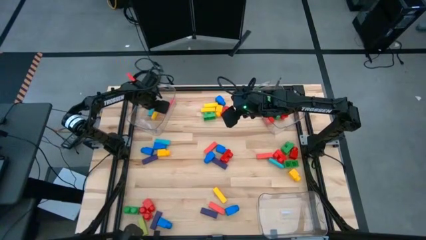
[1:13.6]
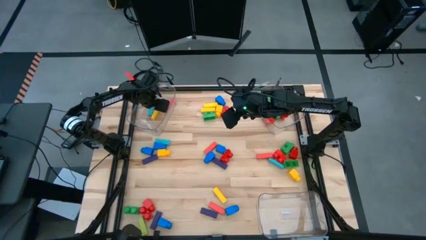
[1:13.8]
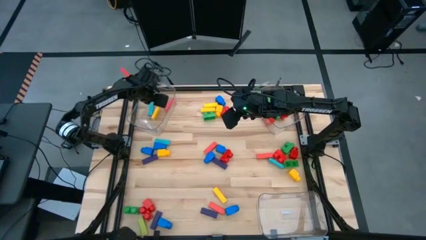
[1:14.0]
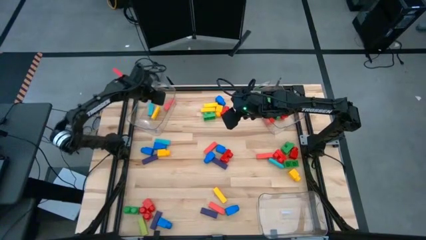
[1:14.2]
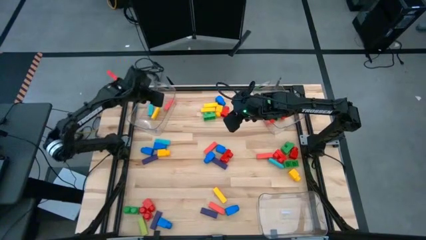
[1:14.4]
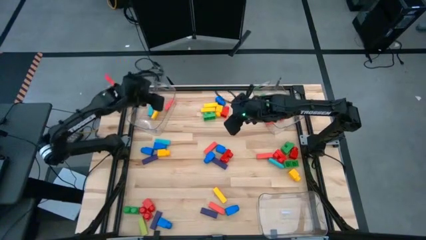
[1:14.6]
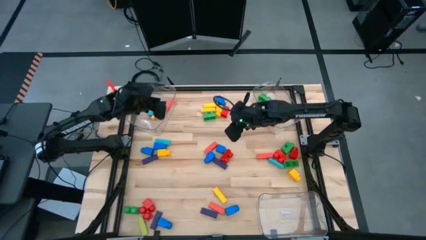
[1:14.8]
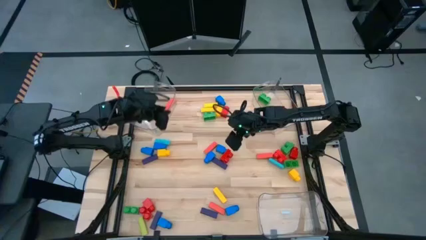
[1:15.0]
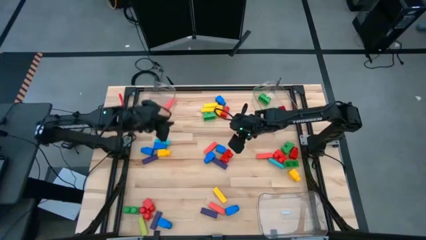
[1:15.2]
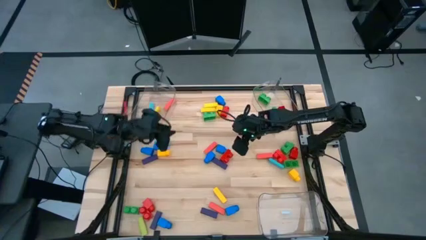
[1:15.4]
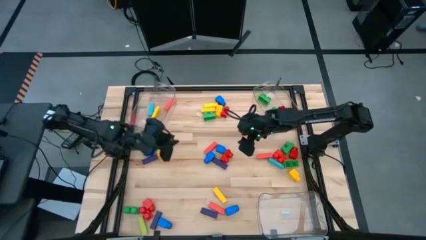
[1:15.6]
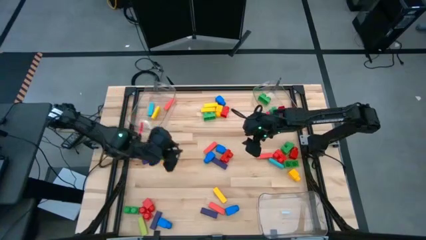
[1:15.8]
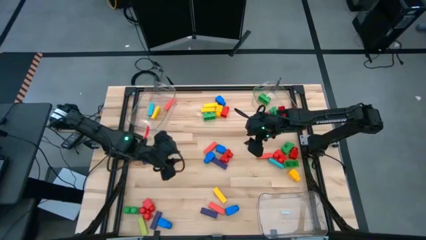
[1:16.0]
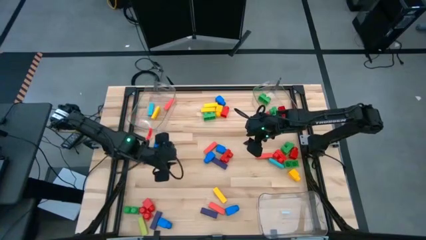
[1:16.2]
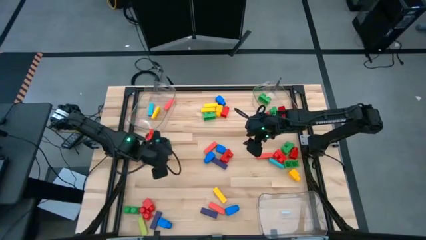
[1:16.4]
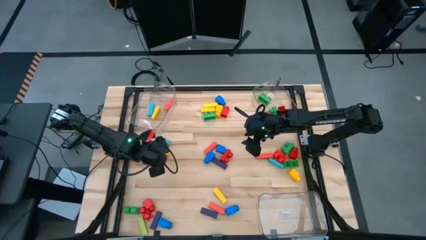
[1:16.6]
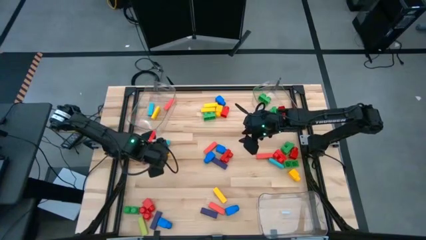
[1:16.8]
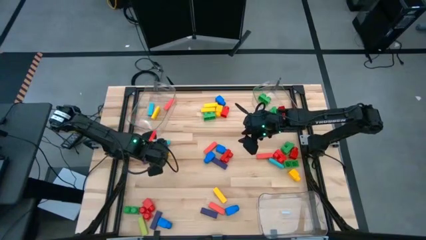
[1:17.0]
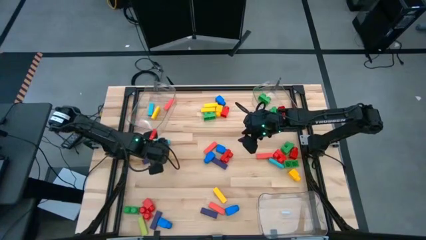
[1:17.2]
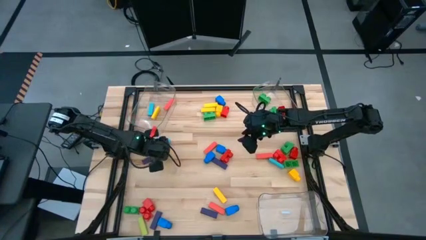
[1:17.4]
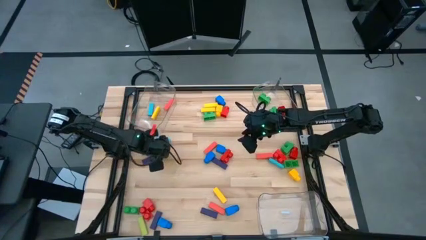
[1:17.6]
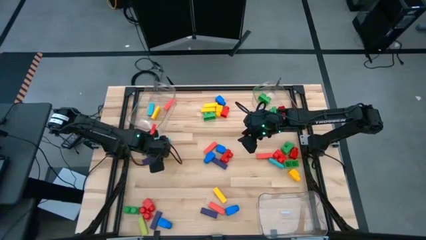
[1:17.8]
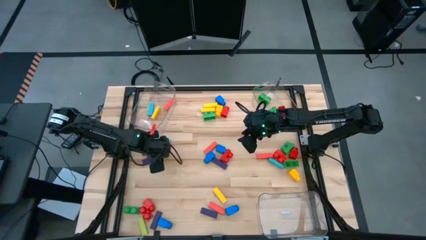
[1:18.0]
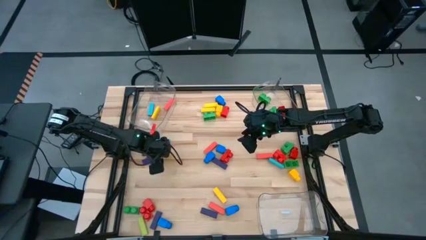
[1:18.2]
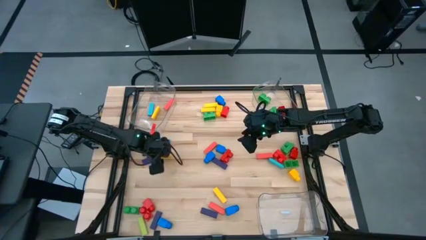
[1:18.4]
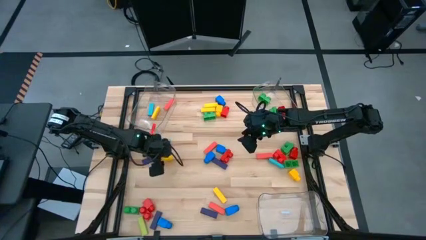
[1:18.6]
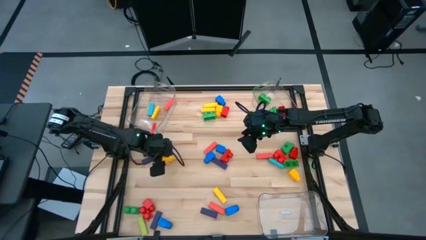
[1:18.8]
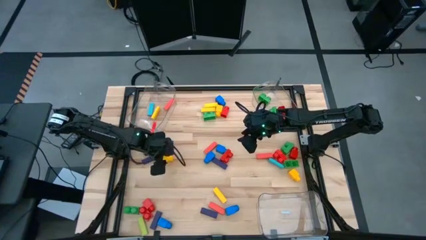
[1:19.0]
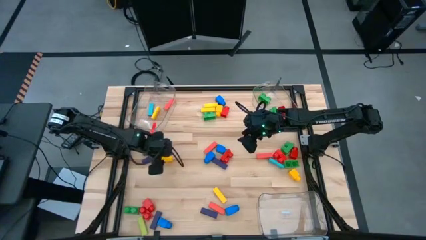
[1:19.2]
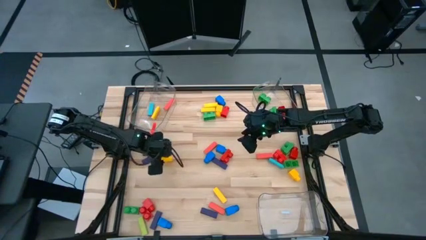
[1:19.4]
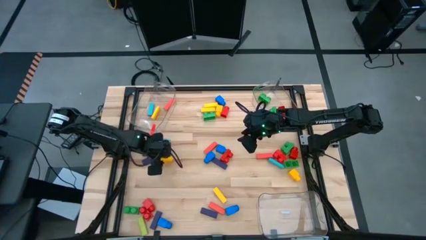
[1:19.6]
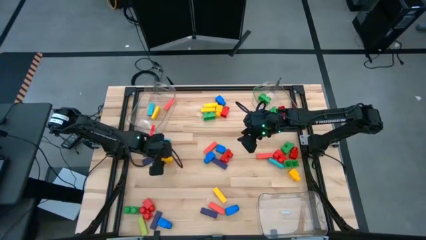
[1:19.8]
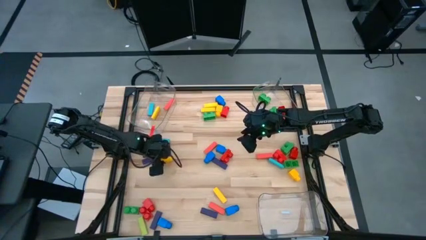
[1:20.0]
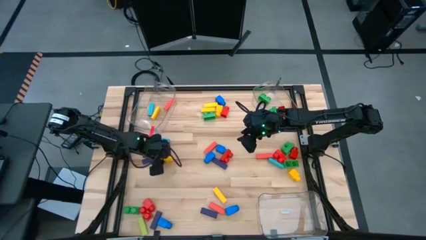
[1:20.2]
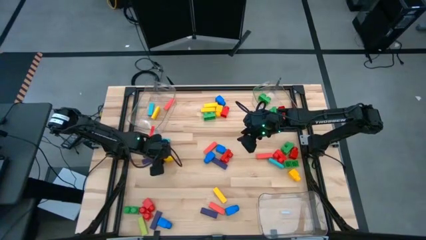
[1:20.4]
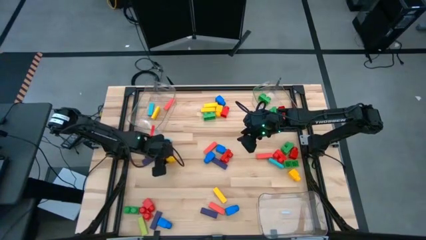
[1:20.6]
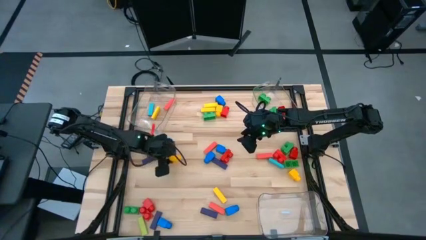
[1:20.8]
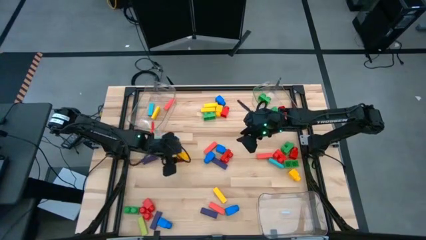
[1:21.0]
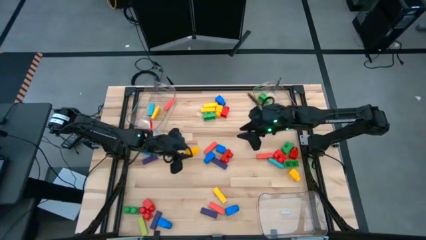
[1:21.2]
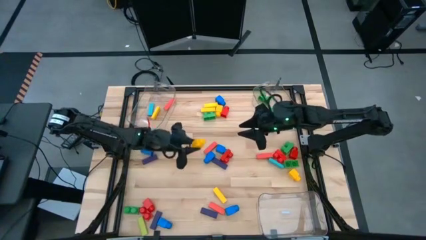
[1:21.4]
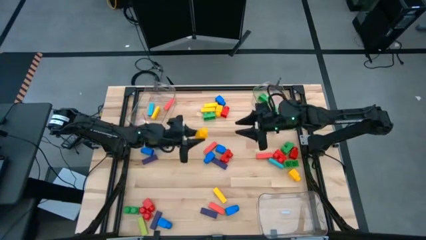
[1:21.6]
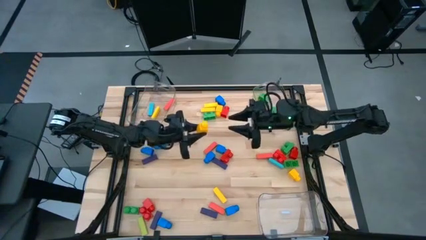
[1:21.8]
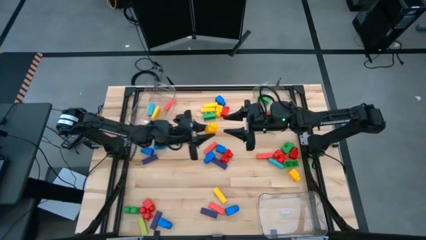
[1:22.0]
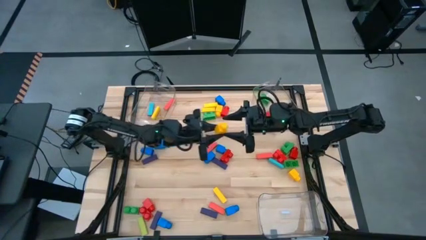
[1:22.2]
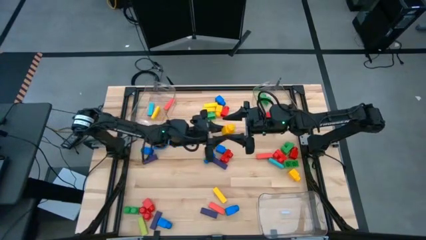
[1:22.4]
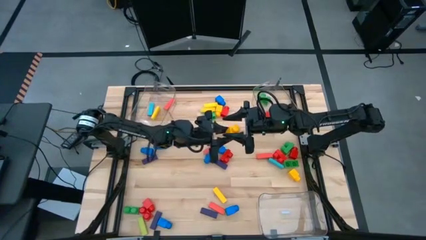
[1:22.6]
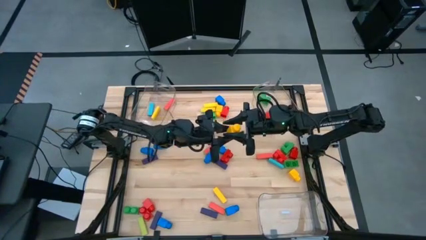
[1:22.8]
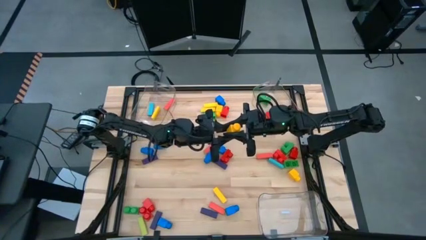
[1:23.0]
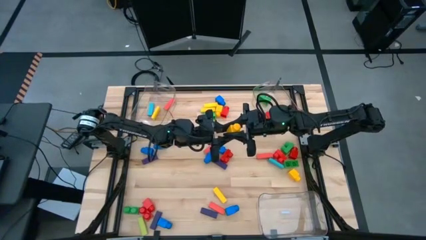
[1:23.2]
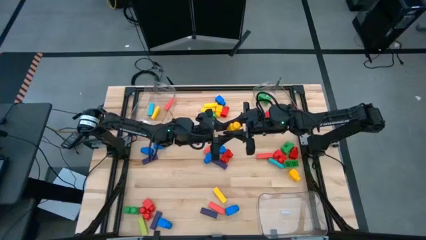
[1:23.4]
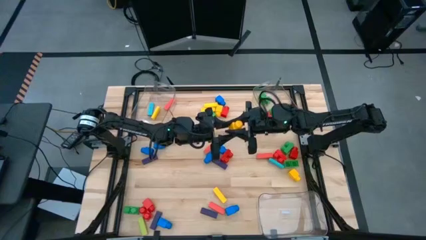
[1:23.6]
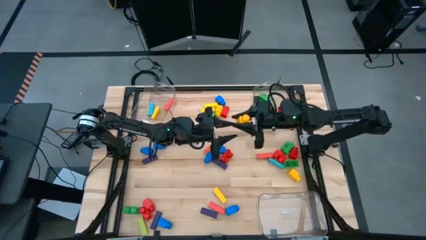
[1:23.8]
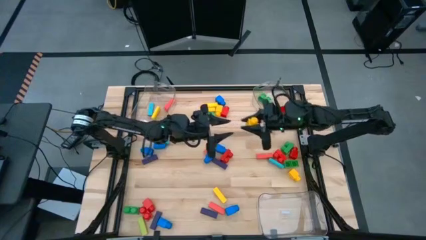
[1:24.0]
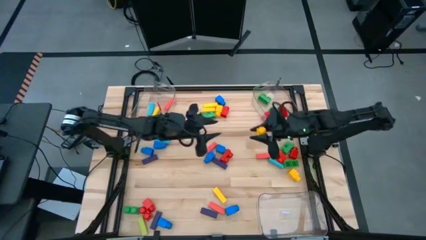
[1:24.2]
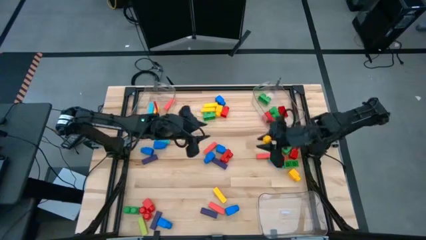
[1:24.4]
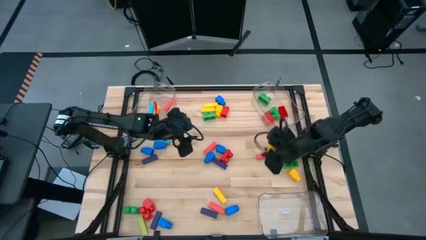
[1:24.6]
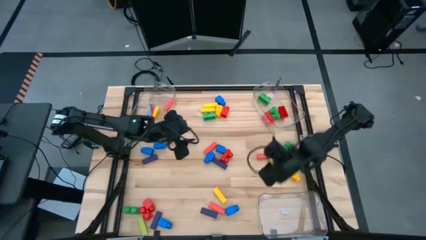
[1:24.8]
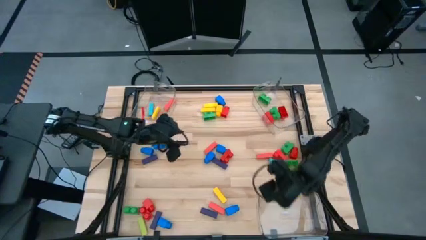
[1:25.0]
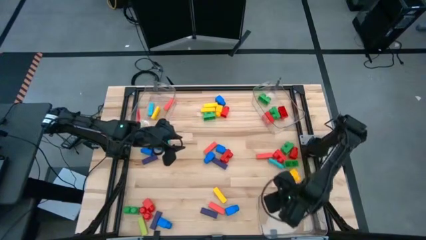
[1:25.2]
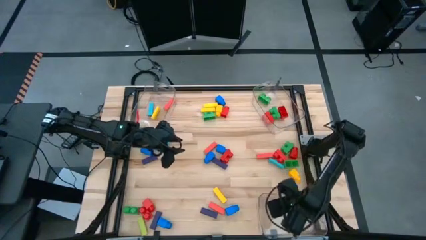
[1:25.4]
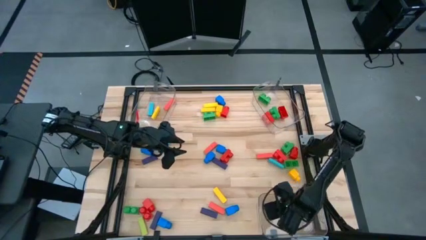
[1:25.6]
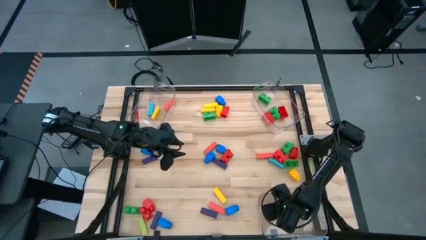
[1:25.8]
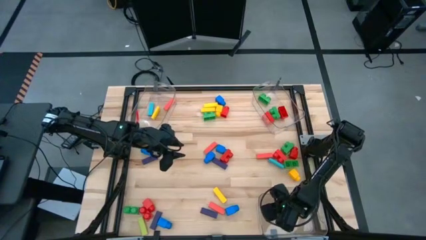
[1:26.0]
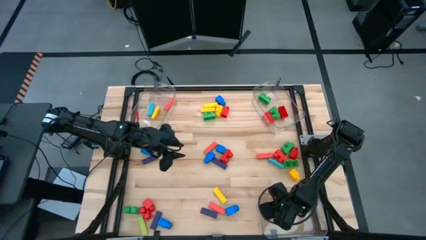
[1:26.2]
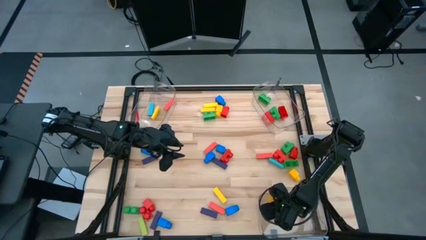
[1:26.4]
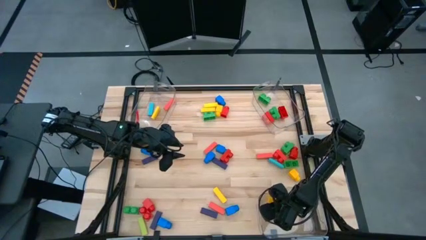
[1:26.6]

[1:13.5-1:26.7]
Task: Sort blocks by size
Put the yellow 1 stud game piece into the bottom transparent bin

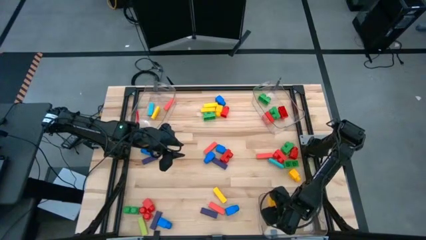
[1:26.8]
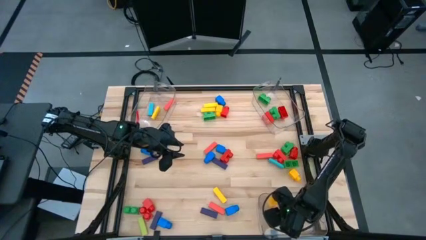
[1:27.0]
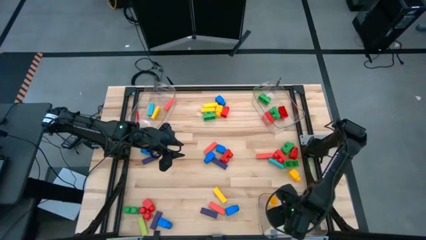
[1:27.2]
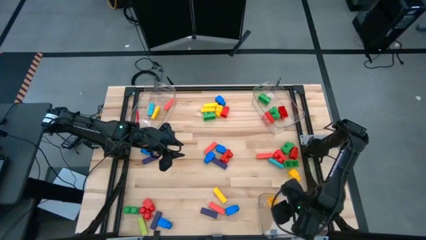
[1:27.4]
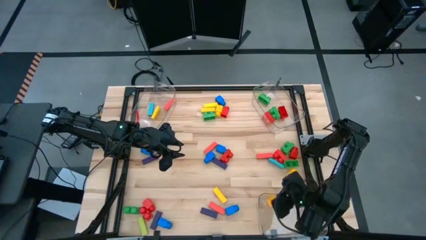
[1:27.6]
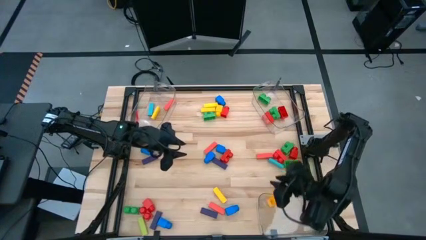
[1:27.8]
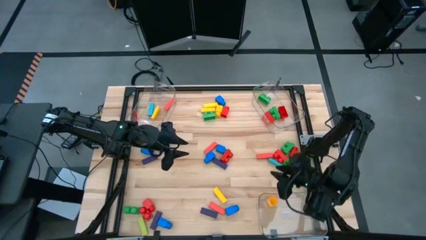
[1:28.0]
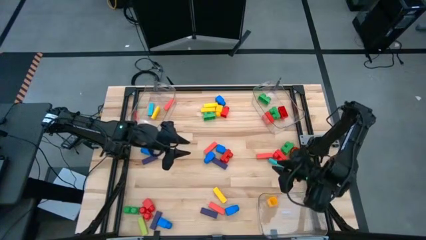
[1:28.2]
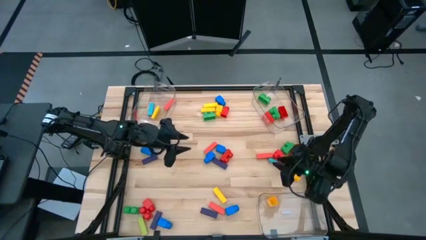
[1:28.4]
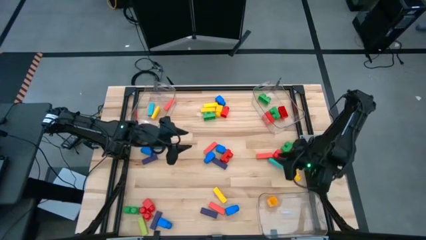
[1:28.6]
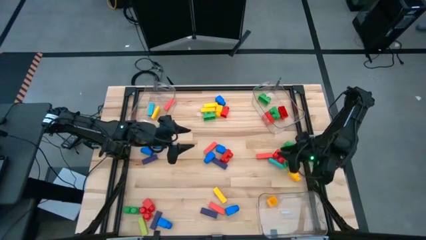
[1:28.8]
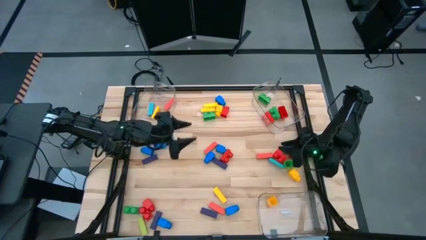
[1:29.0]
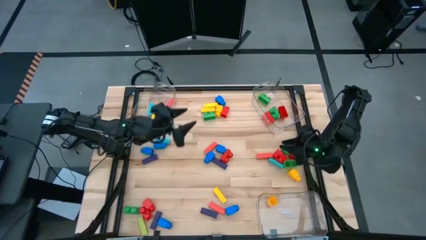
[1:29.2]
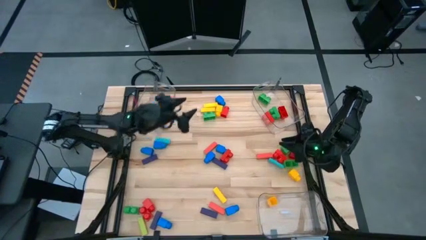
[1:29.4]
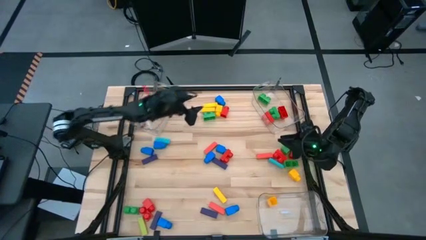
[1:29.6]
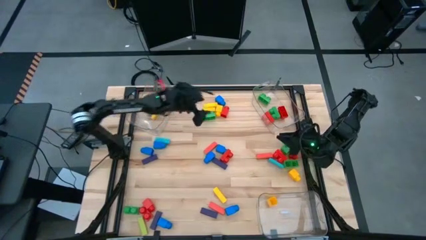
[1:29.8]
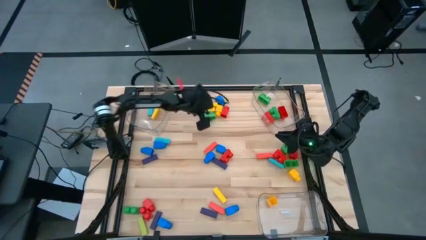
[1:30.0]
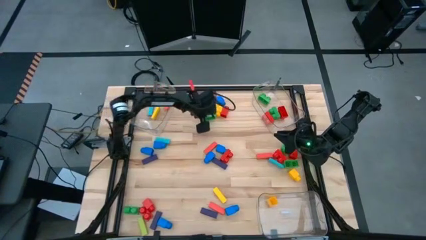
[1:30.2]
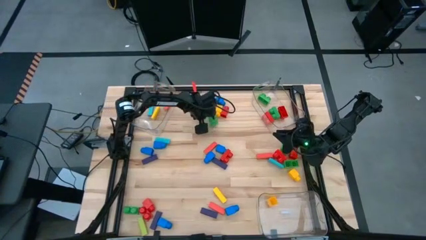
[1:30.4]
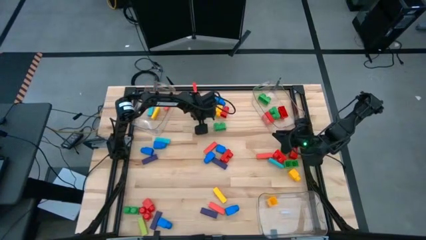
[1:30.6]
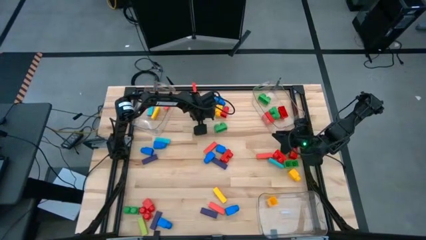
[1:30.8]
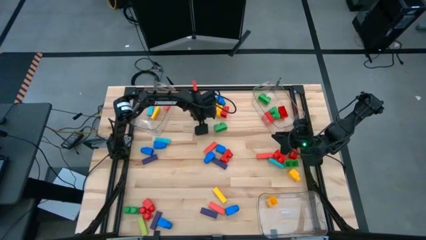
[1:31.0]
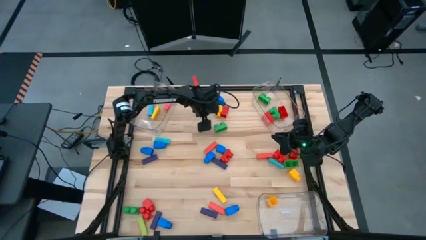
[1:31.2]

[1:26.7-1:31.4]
Put the green 2 stud game piece into the top right transparent bin
